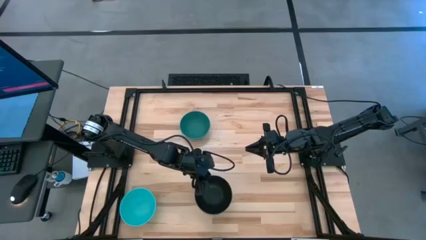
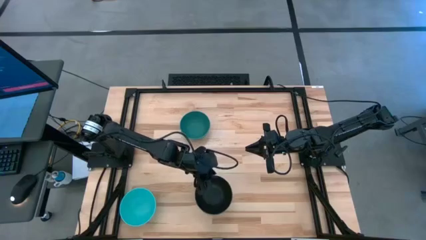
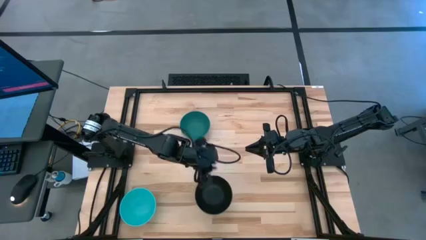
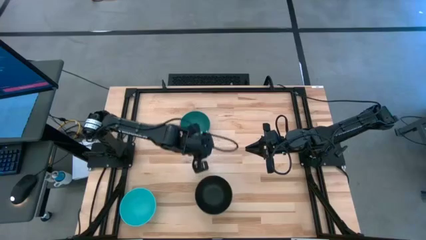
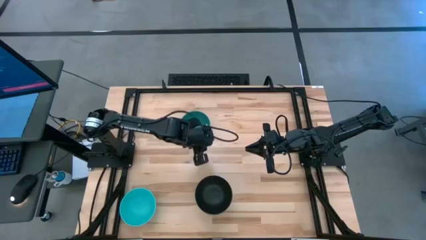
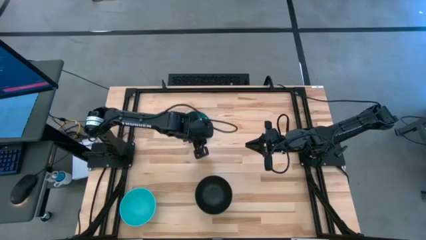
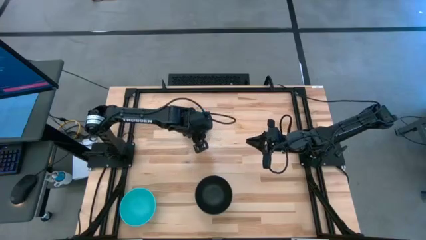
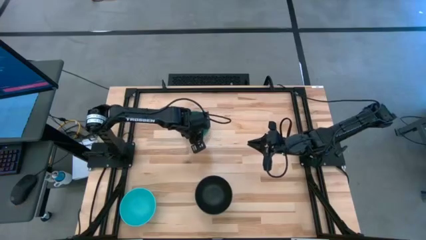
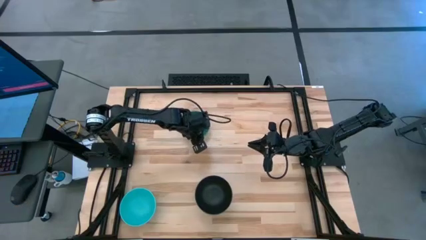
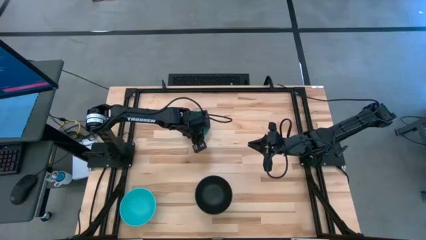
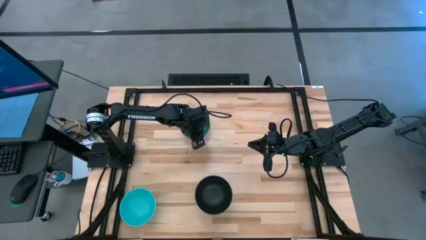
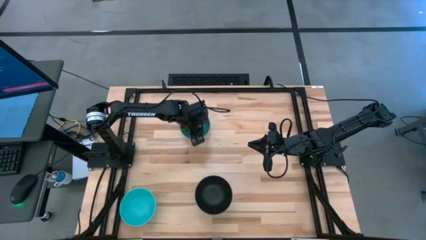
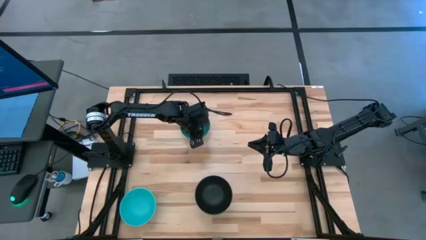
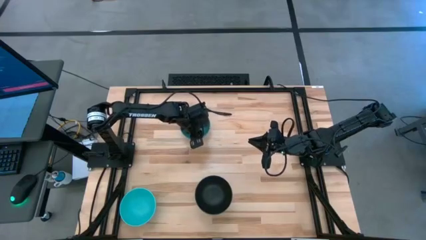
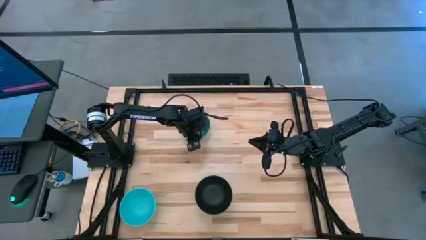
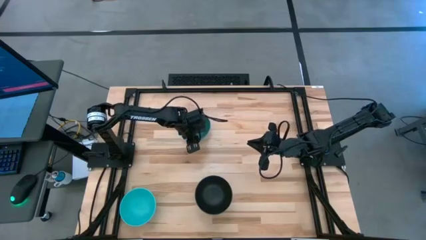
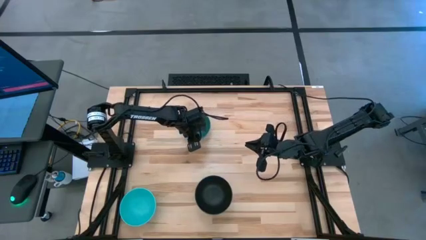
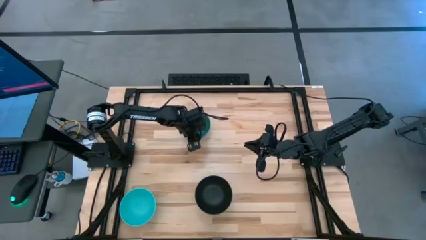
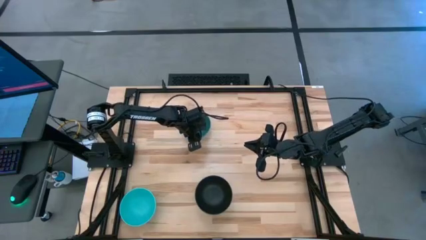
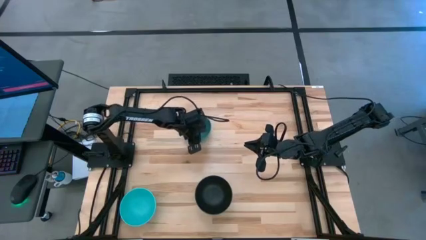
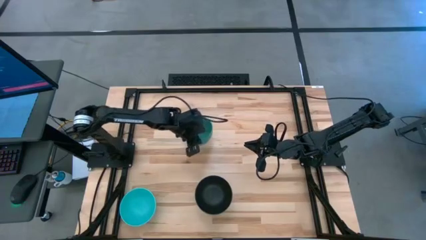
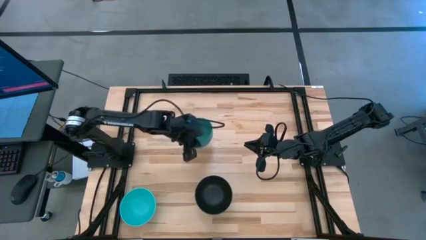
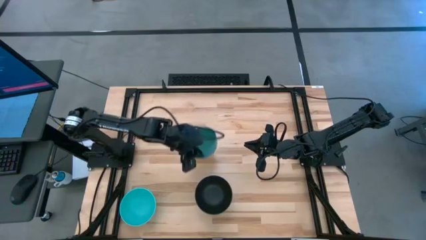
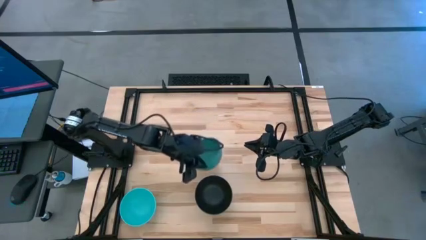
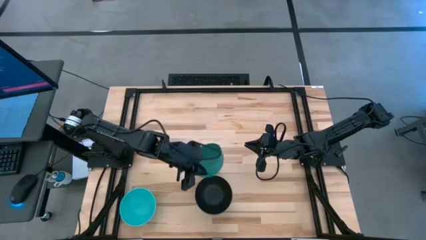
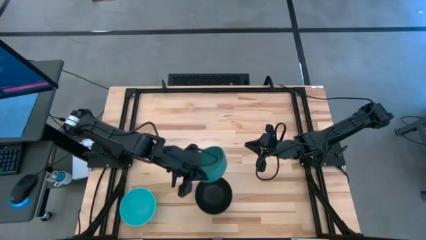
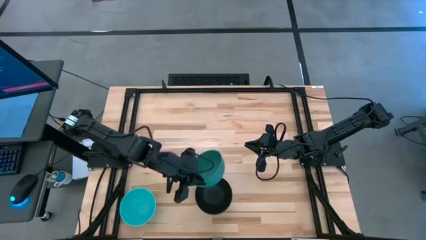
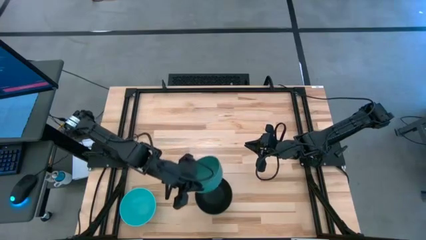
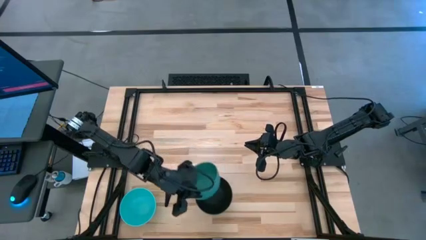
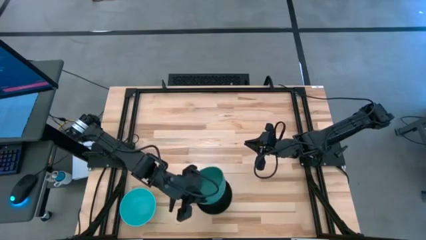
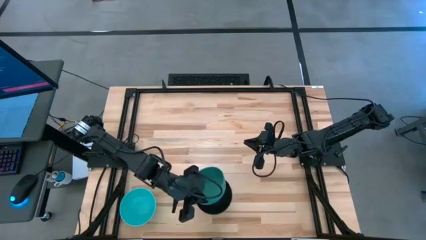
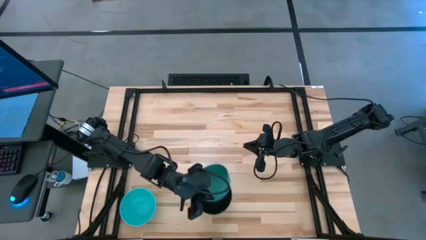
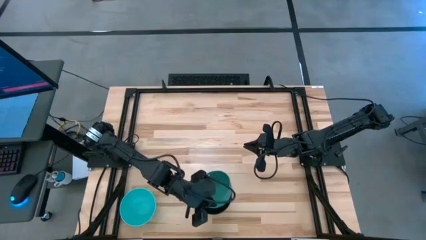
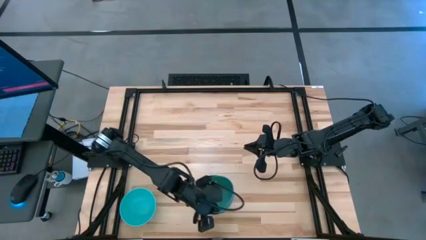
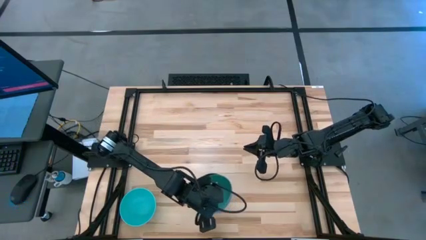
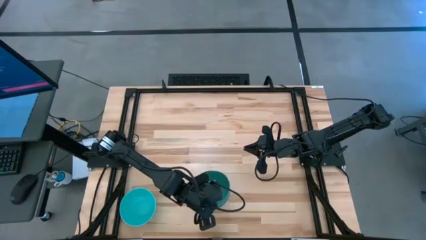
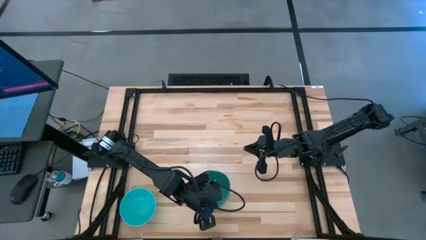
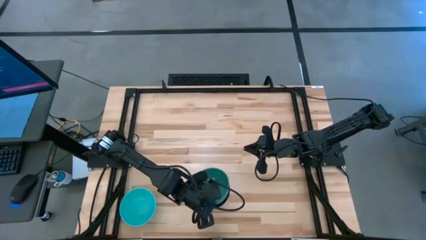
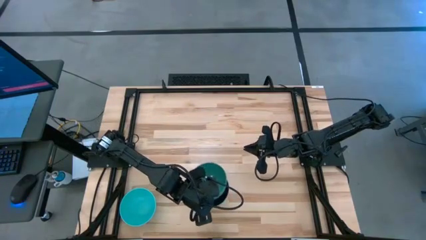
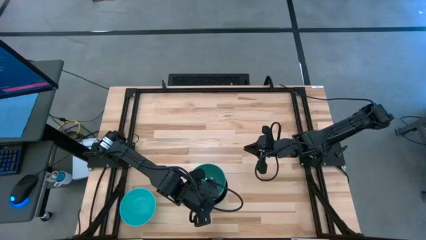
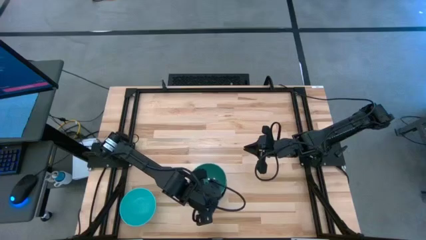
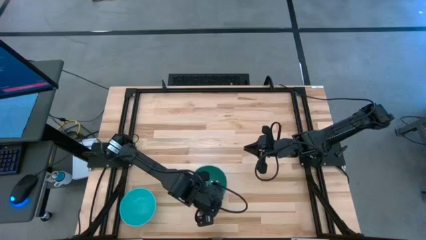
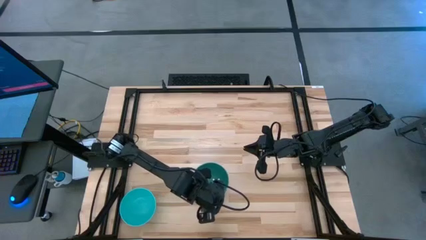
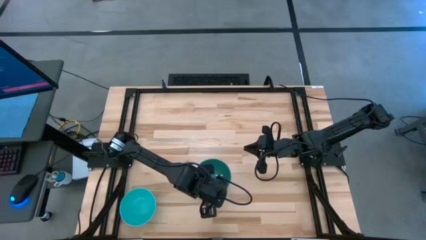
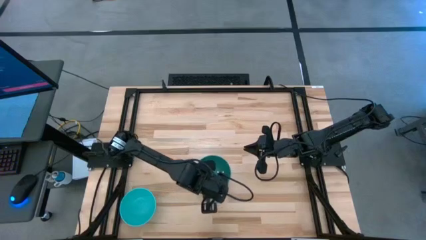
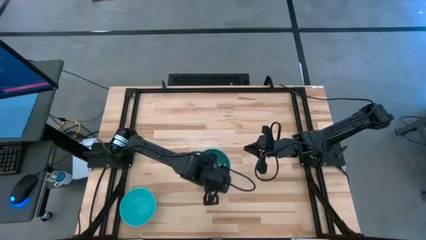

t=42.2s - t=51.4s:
Task: Nest bowls inside each other
Stack the green bowl on top of the black bowl

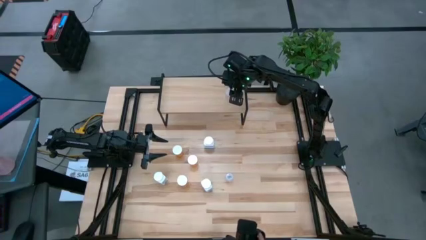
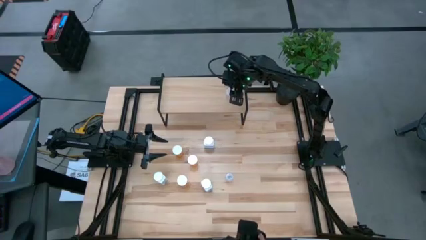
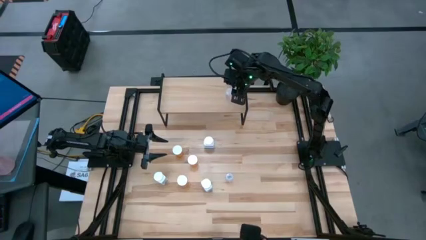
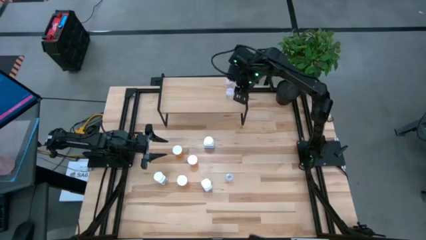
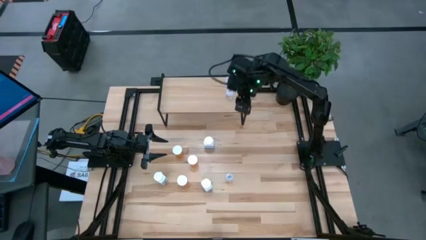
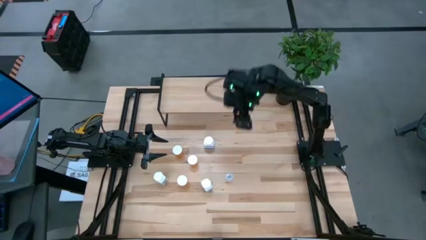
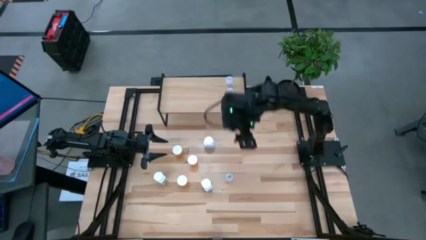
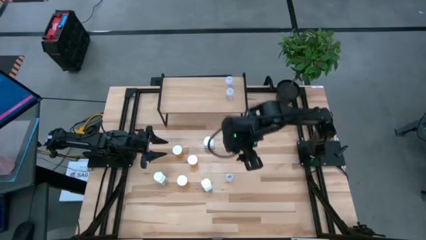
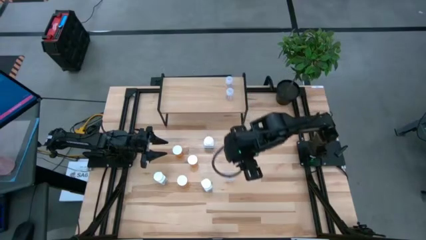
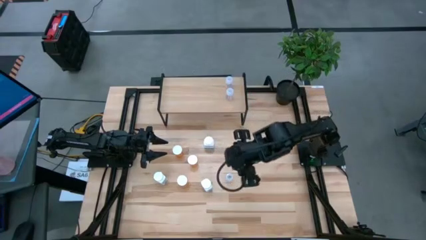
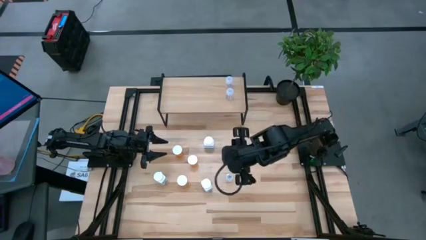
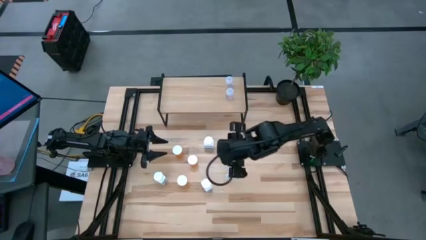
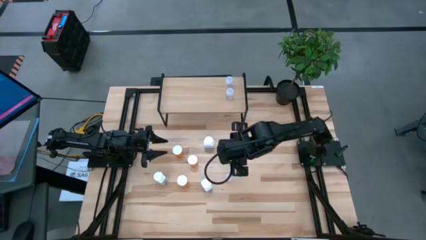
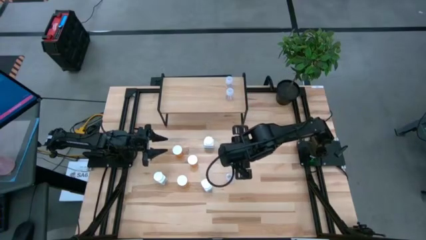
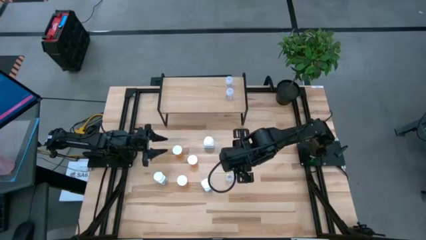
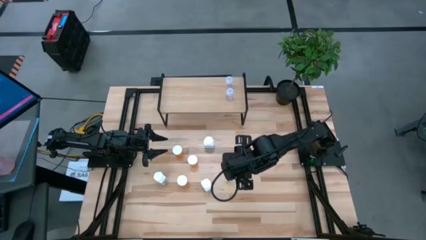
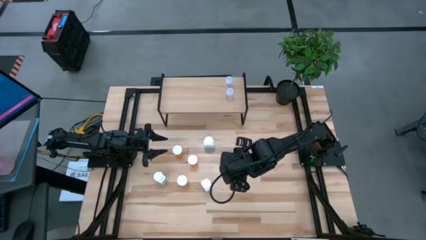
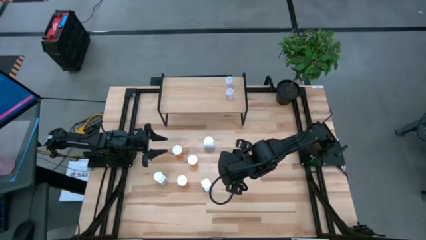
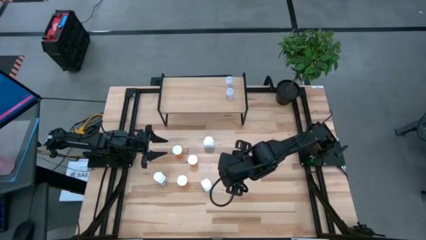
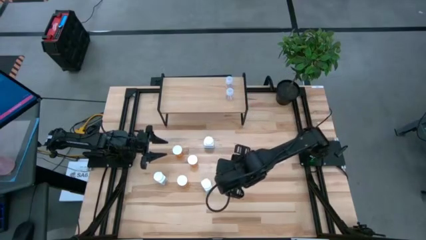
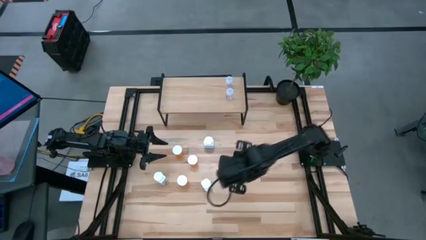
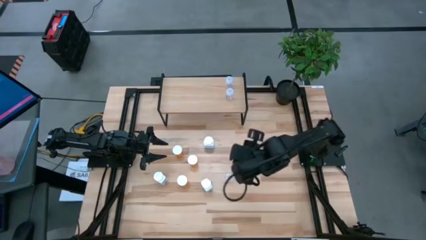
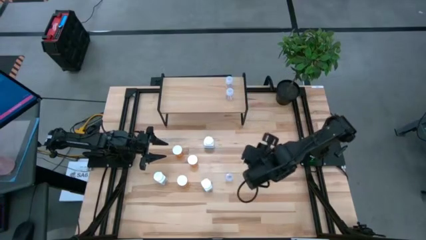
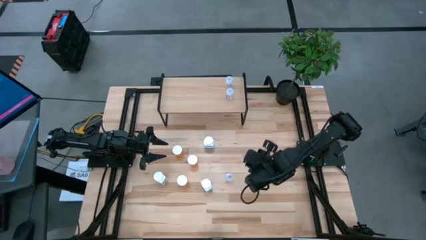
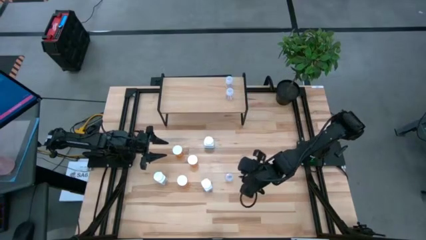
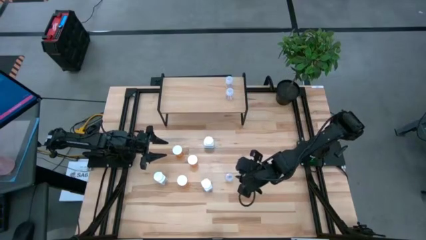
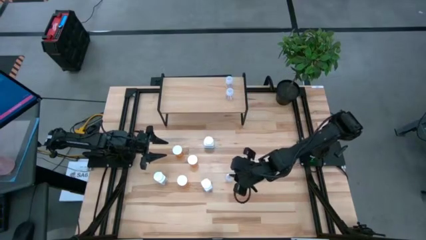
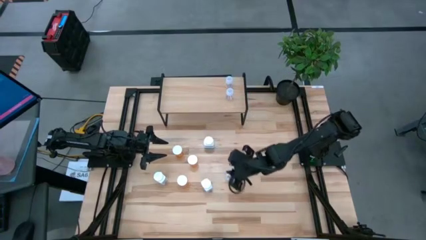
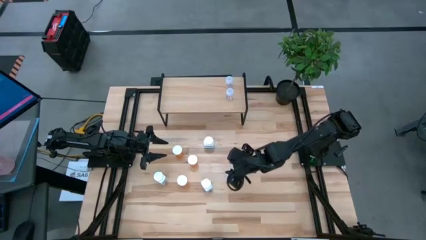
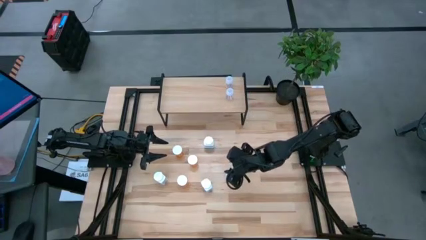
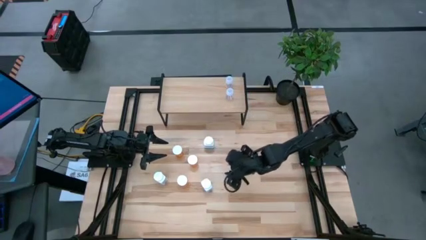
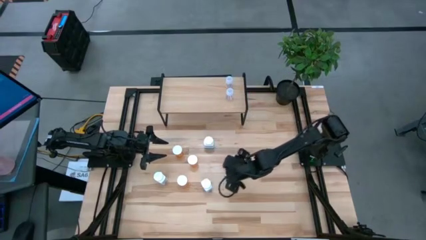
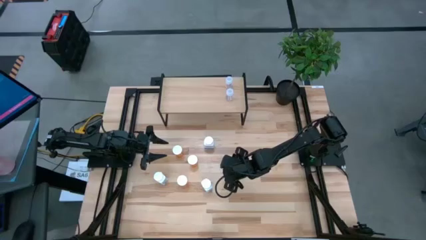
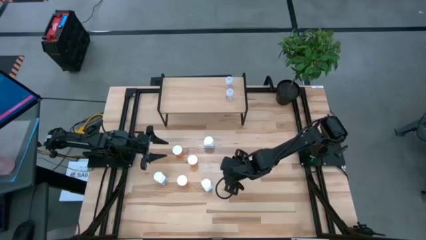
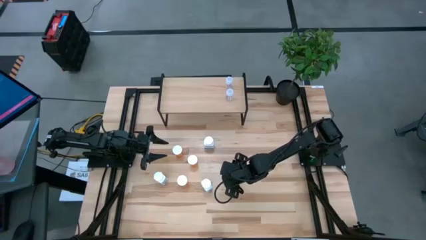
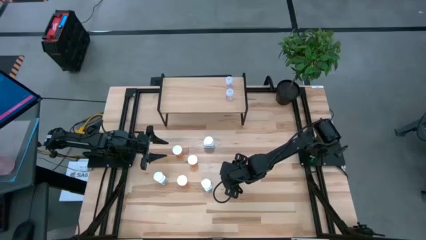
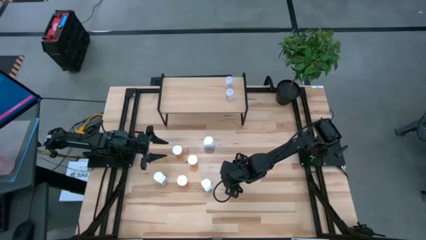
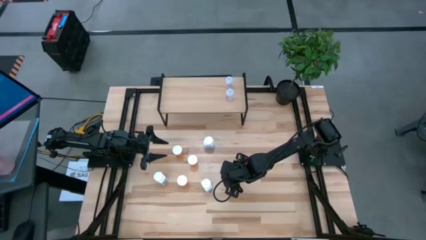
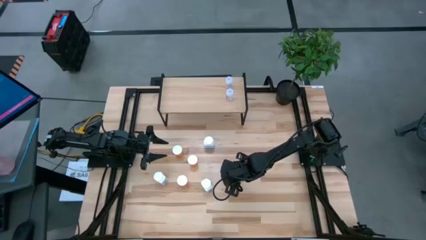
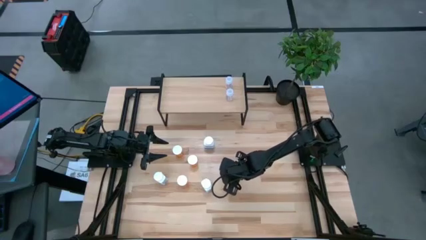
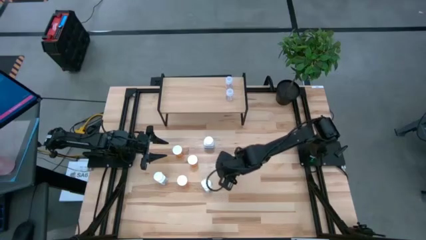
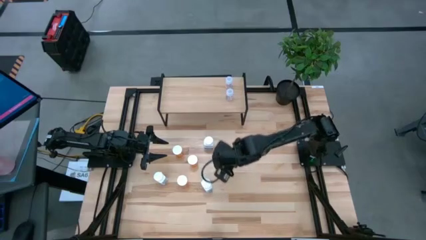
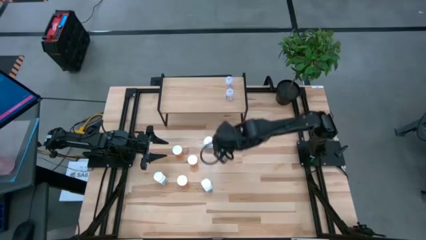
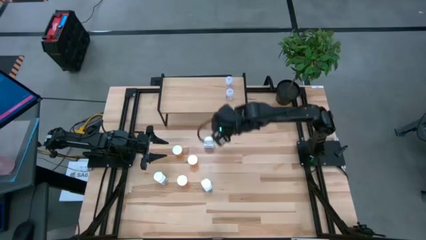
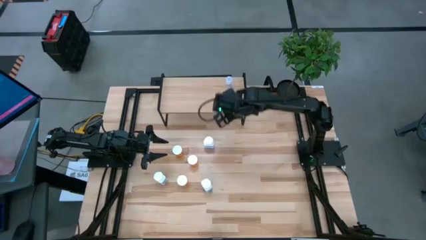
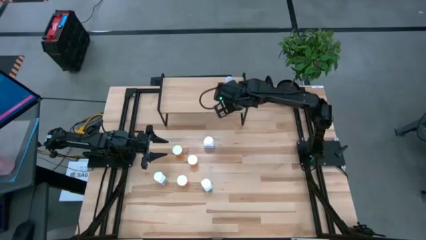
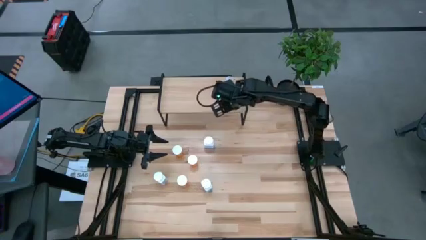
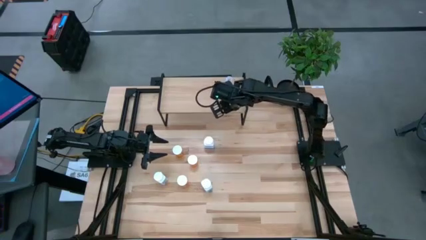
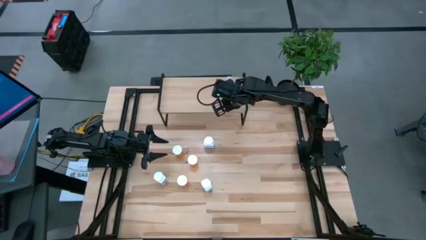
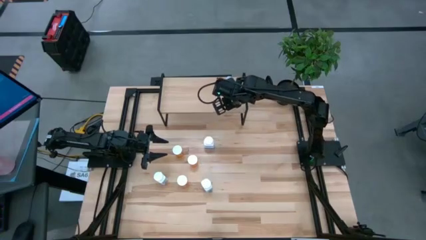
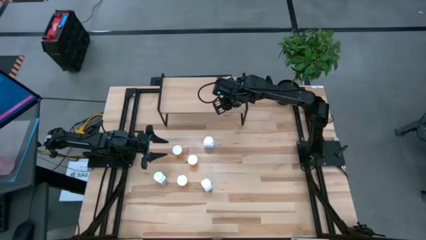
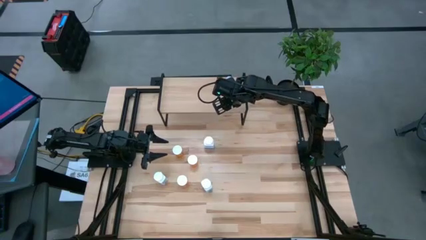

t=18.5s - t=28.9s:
Task: Pick and place medicine bottles onto shelf by color
Put the transparent pill bottle on the shelf aligned with the other transparent pill bottles
